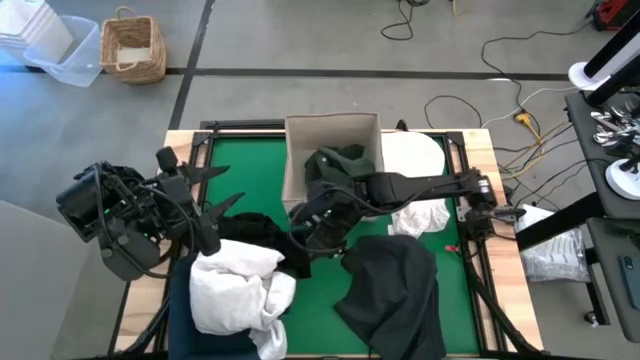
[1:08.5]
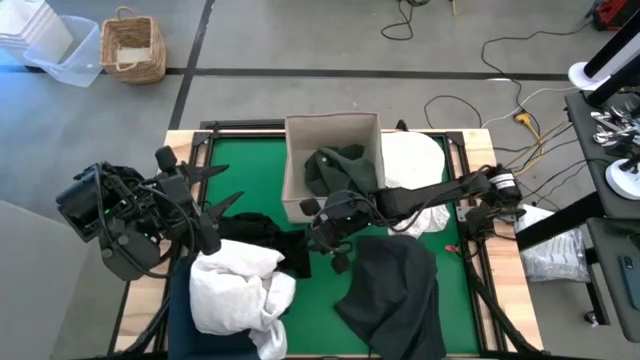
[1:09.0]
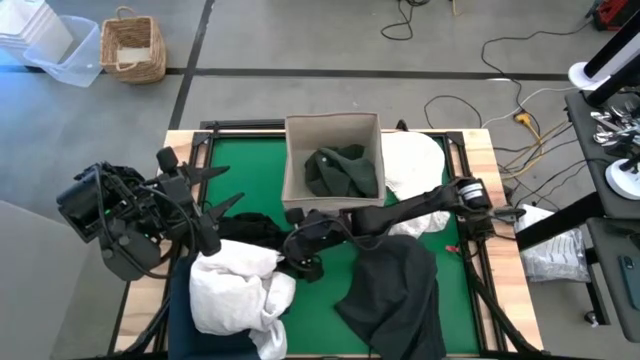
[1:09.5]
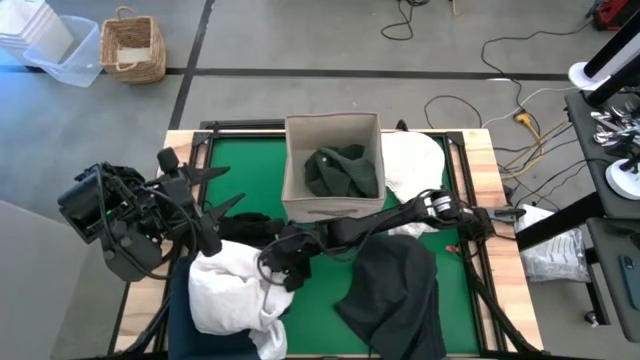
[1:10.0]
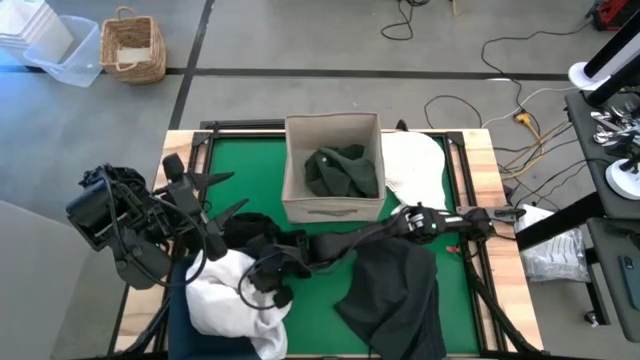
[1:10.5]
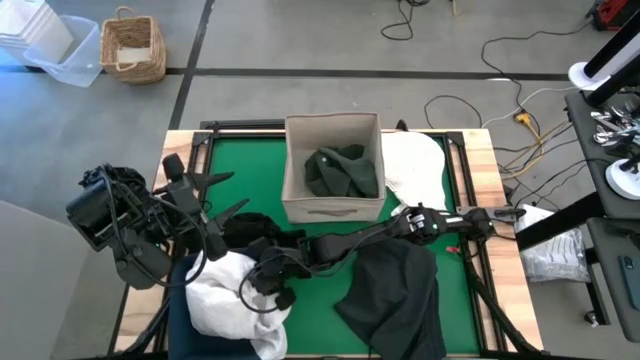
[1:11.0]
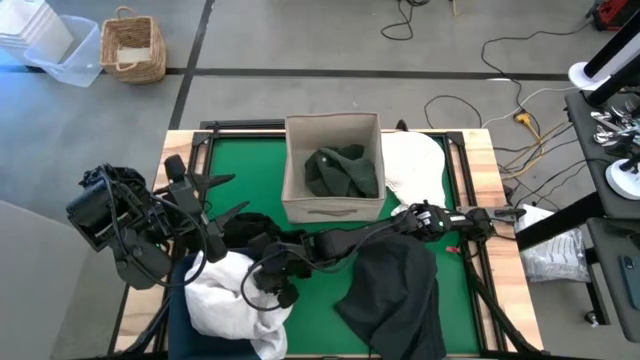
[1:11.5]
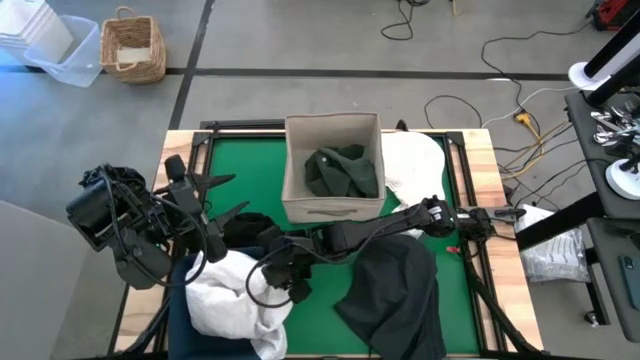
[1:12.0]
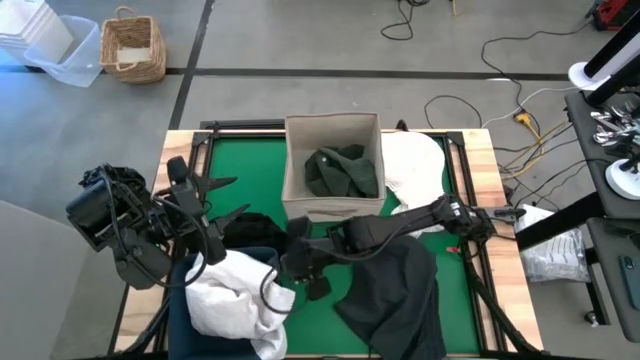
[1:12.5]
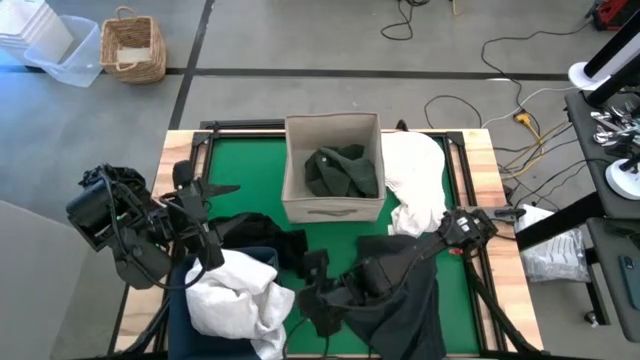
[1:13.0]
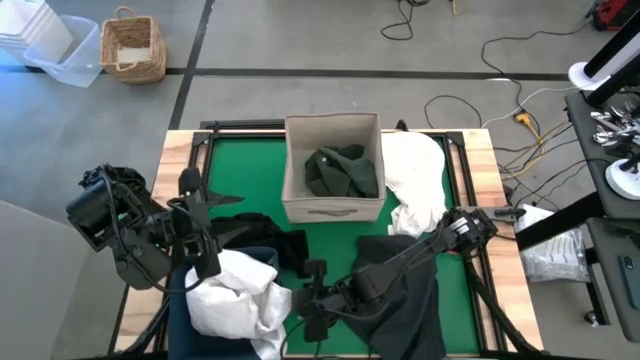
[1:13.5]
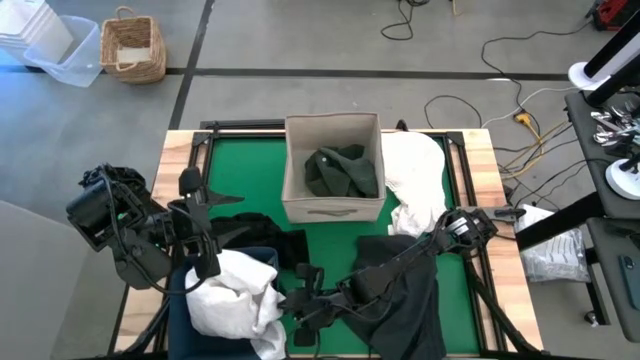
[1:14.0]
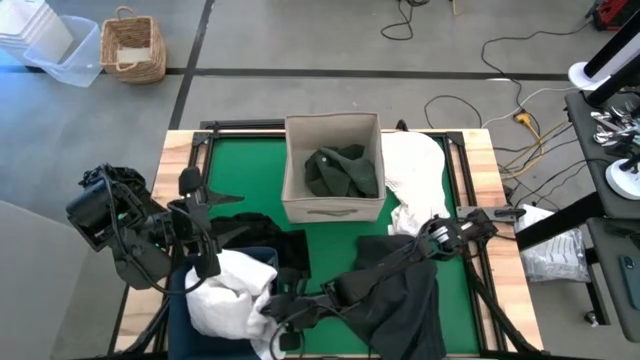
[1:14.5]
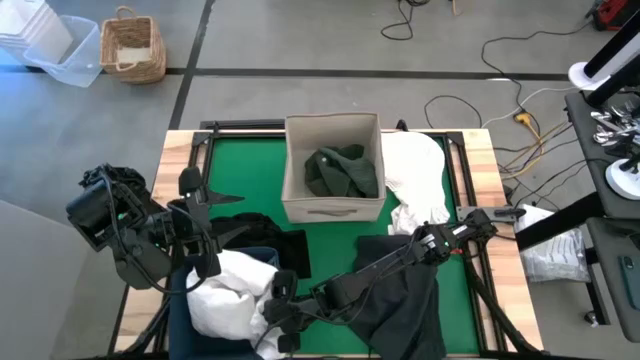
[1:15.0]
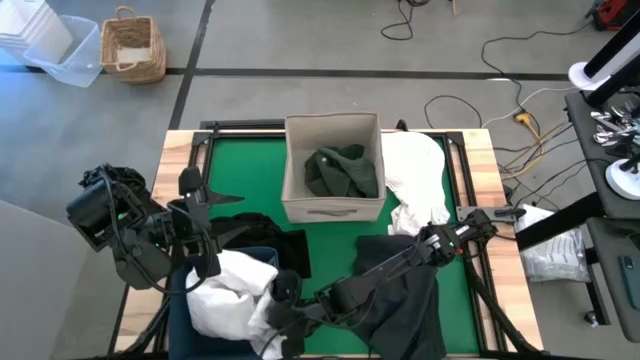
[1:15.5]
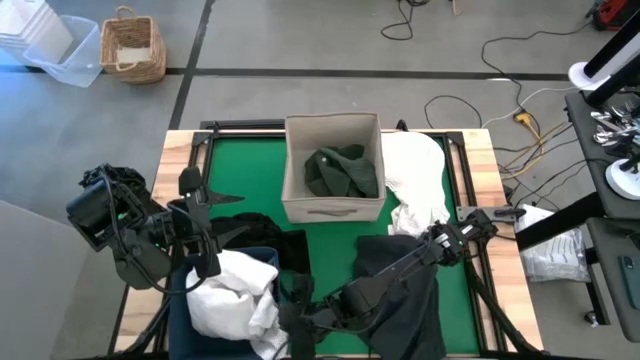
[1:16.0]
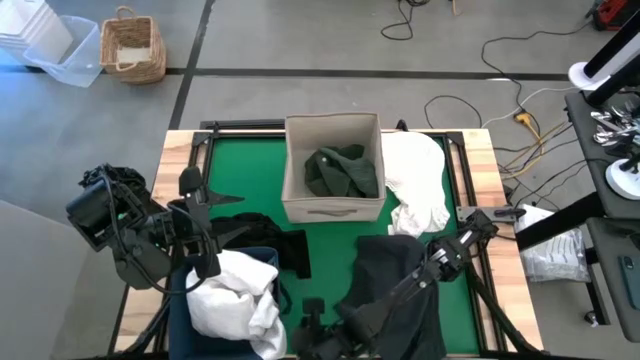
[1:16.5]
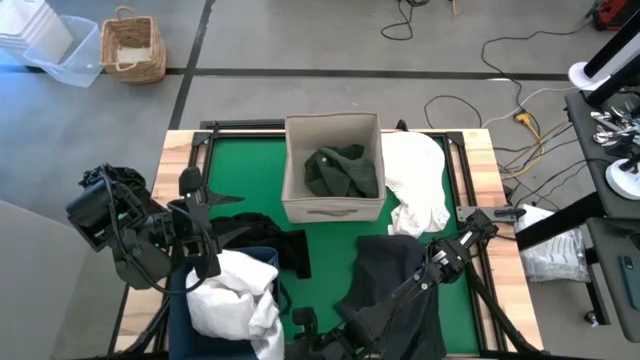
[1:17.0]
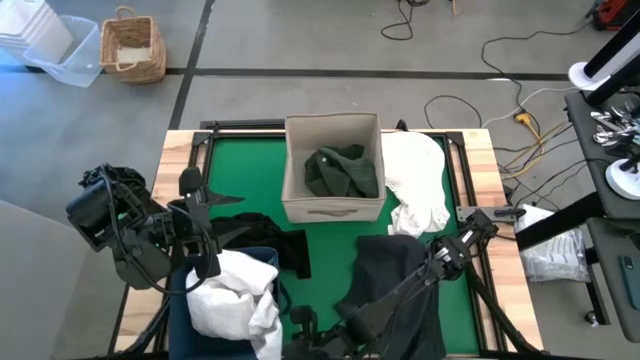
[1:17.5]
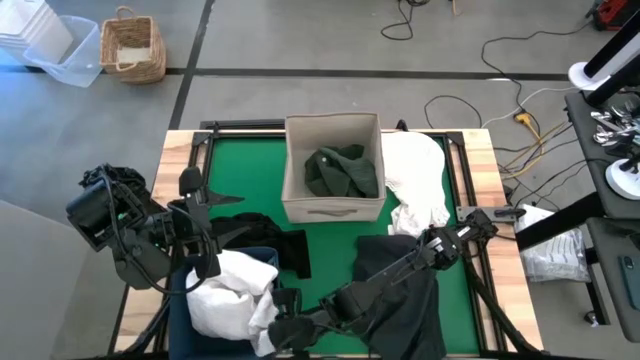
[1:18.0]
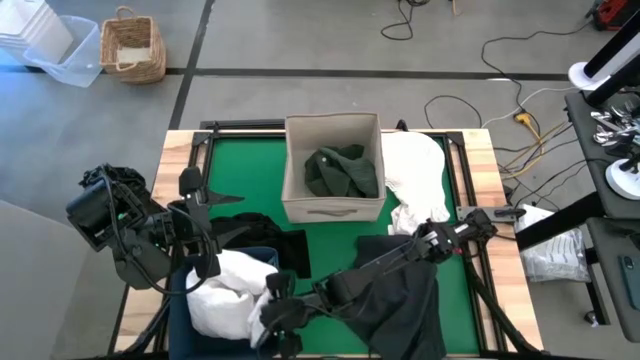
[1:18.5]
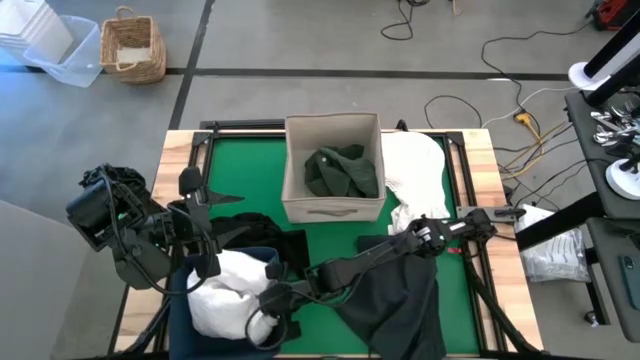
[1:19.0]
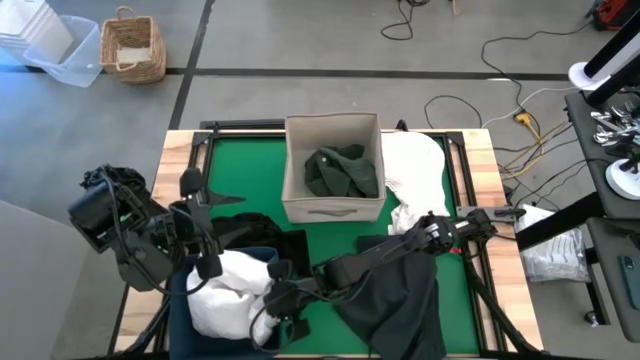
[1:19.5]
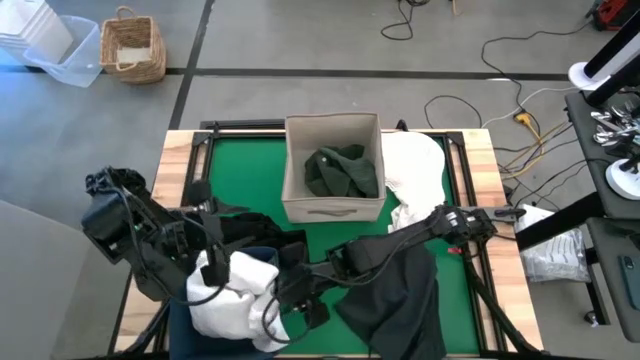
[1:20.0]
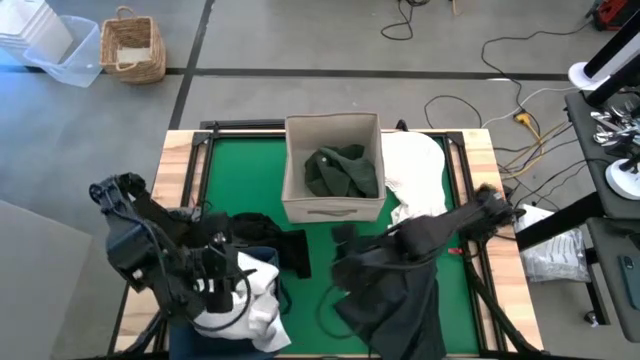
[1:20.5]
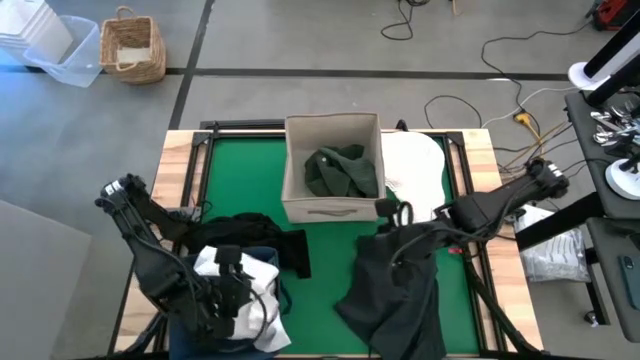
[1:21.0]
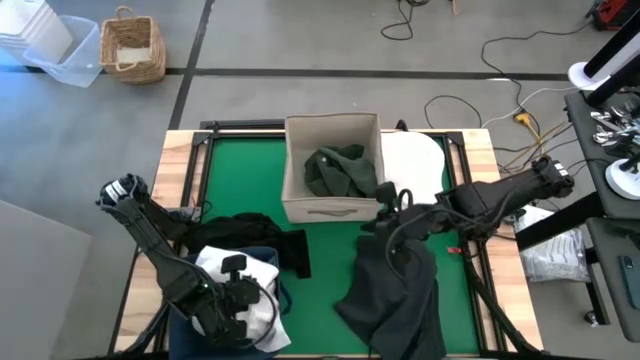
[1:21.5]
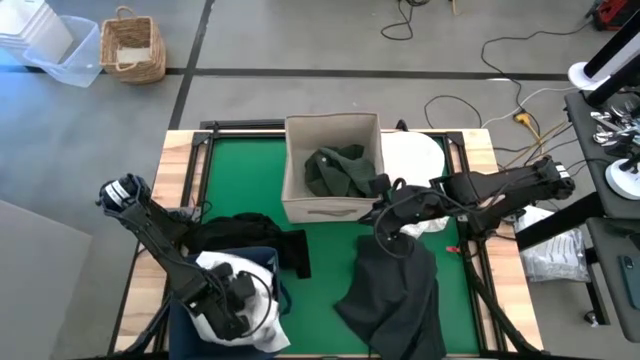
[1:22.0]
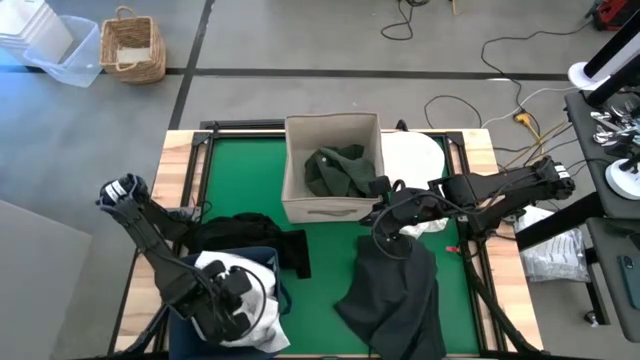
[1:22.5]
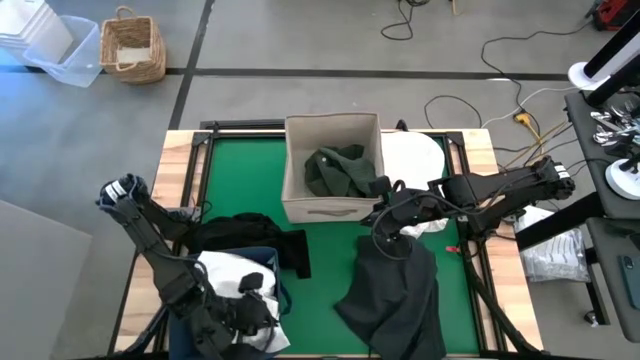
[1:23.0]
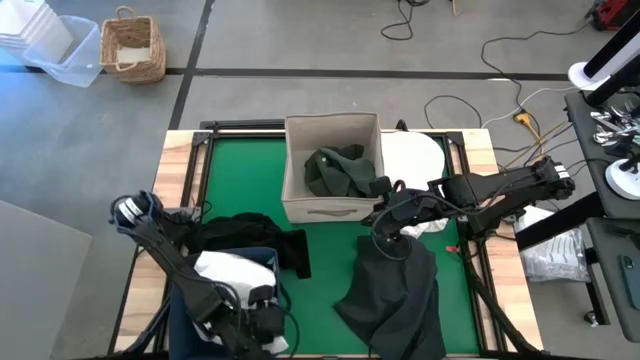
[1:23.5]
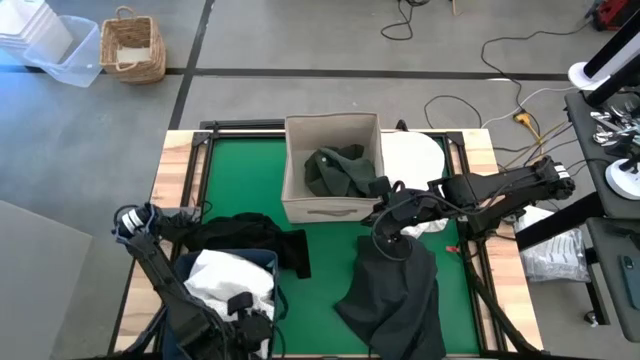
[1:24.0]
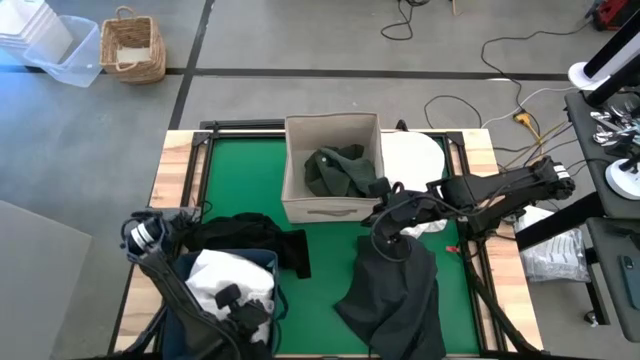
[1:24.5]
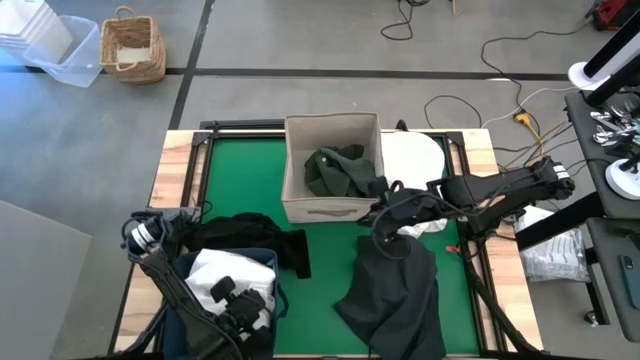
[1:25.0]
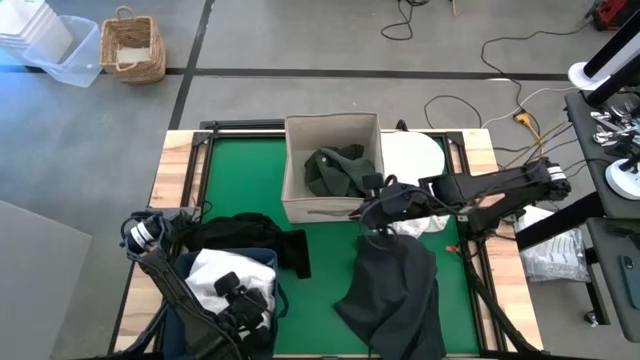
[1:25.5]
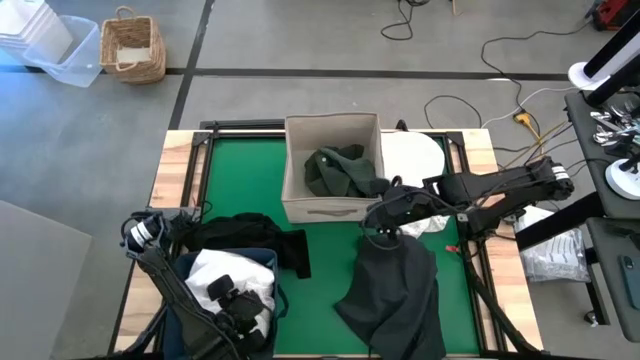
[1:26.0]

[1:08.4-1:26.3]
Put the white cloth into the blue laundry bin
